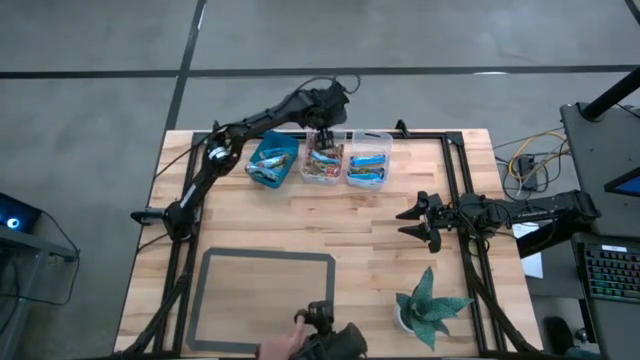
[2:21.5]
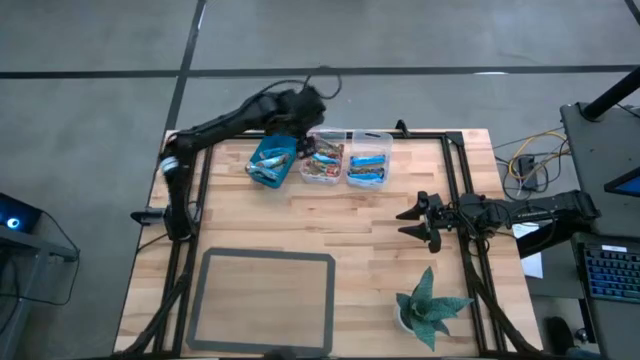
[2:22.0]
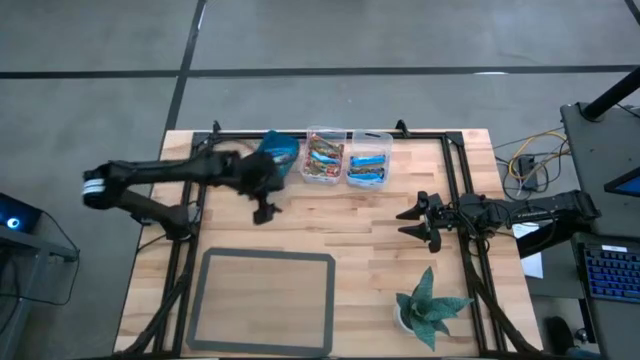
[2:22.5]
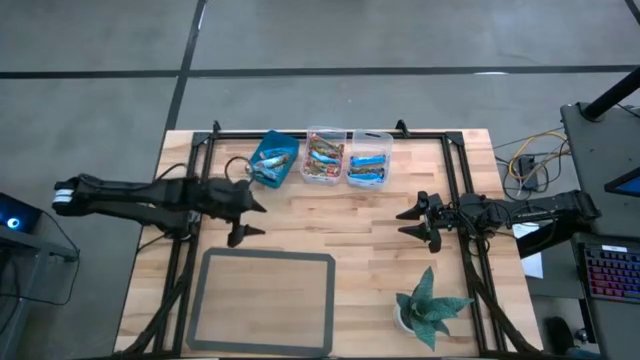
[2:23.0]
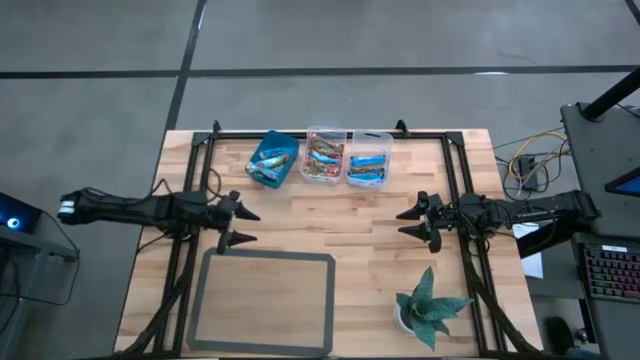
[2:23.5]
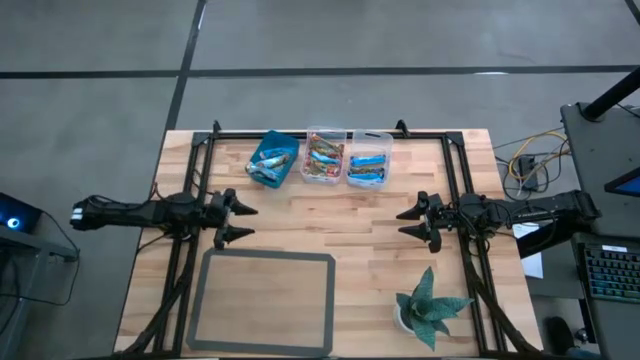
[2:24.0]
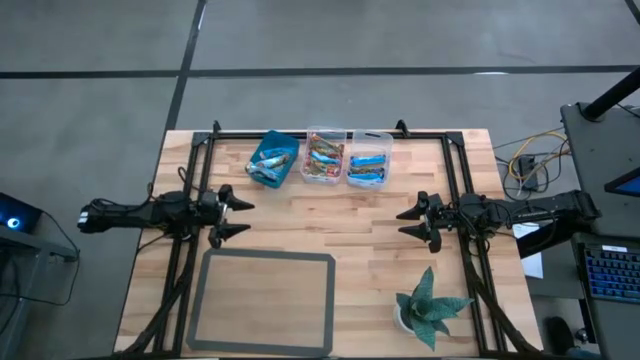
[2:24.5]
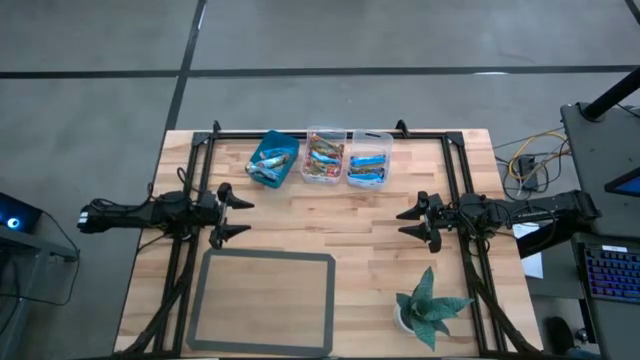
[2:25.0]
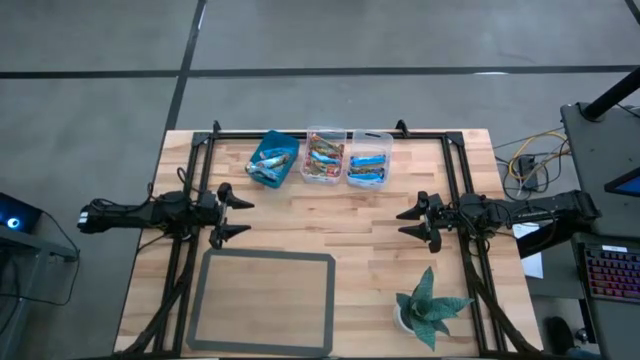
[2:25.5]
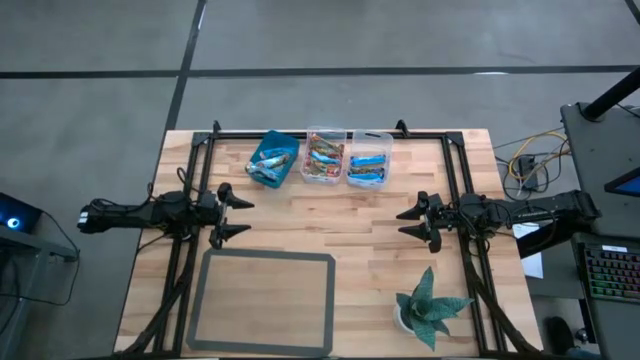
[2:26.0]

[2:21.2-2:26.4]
Task: Pick and place Granola Bars by type
Return to Home Position

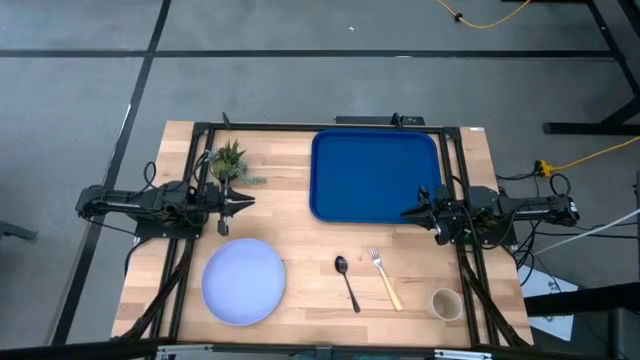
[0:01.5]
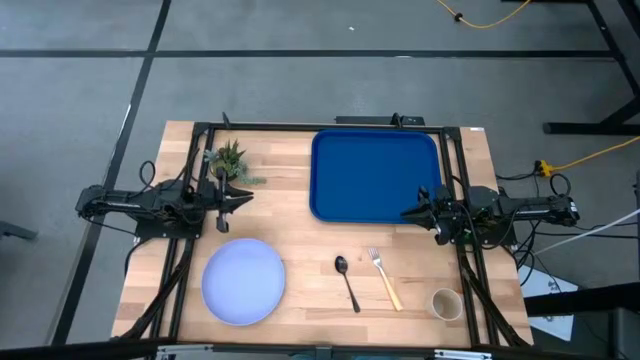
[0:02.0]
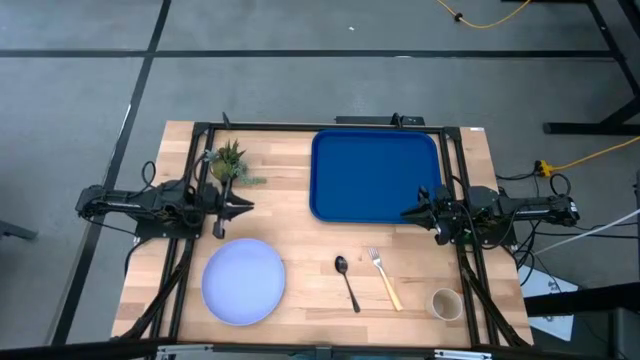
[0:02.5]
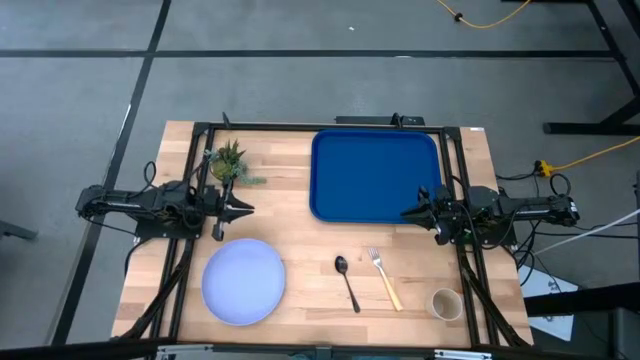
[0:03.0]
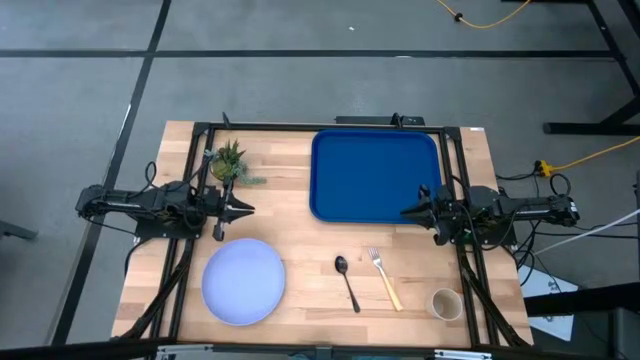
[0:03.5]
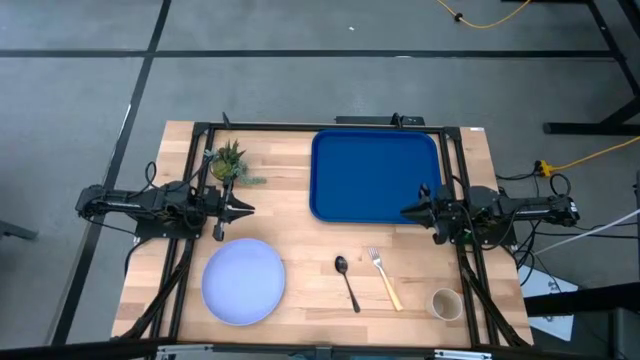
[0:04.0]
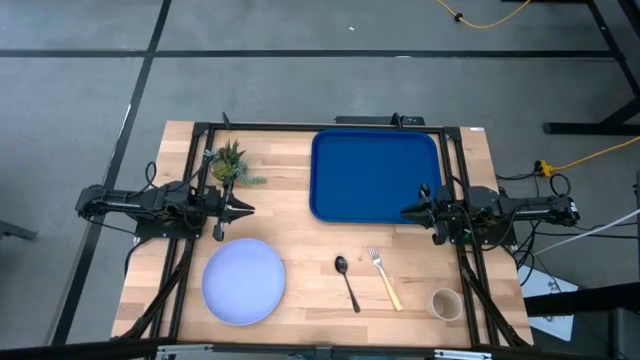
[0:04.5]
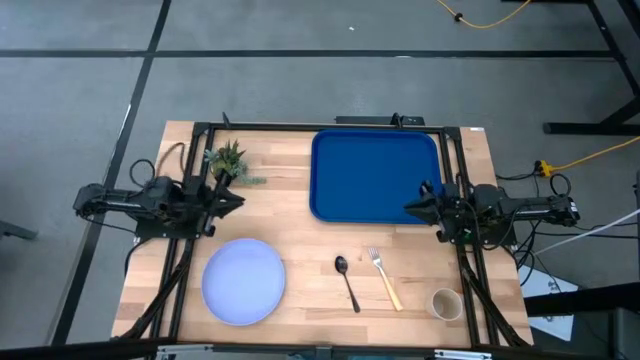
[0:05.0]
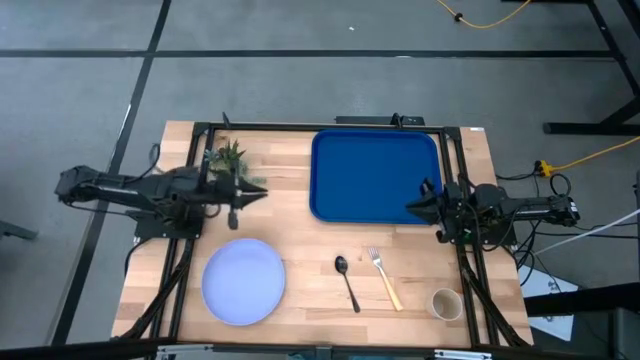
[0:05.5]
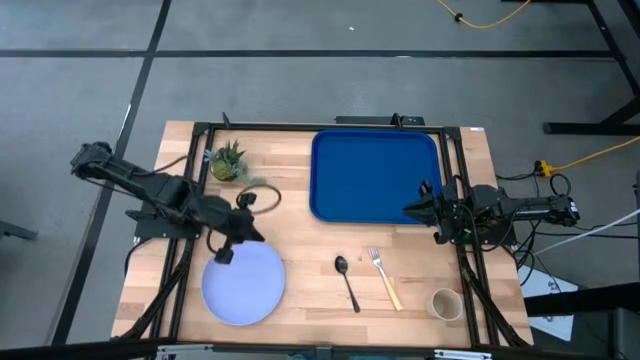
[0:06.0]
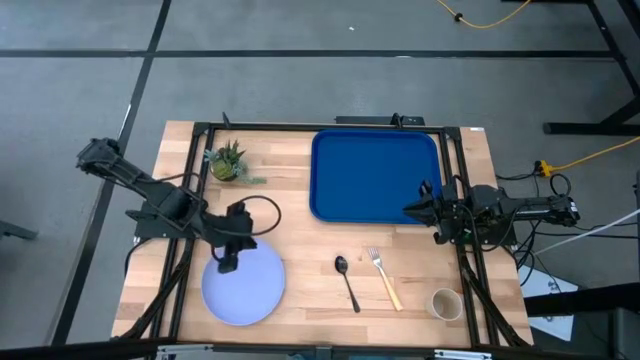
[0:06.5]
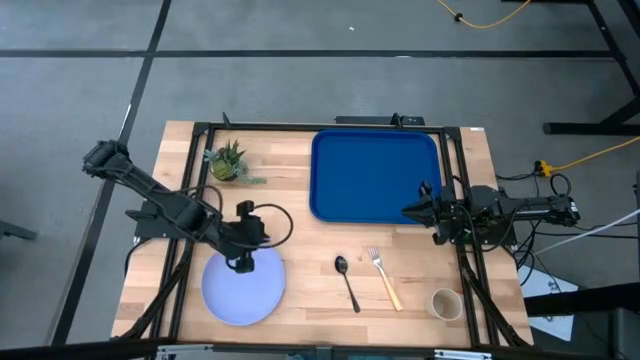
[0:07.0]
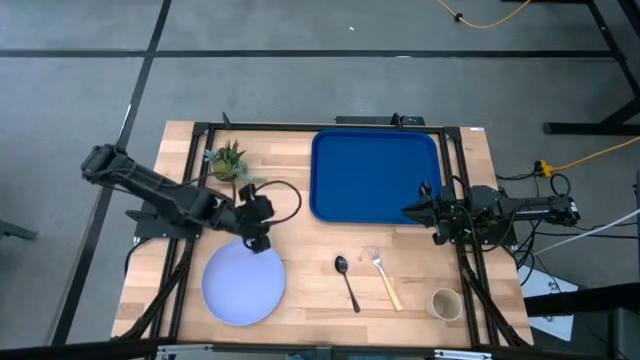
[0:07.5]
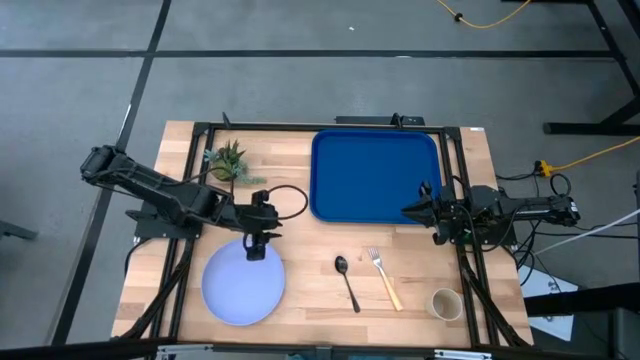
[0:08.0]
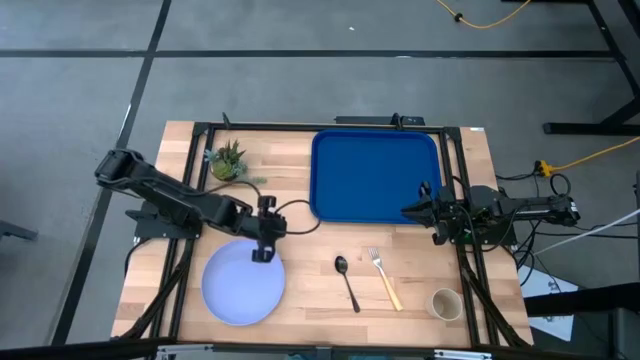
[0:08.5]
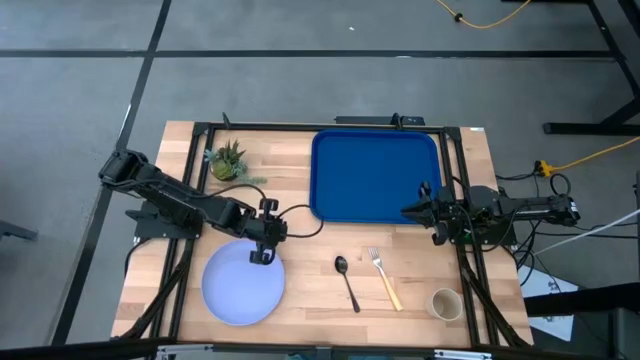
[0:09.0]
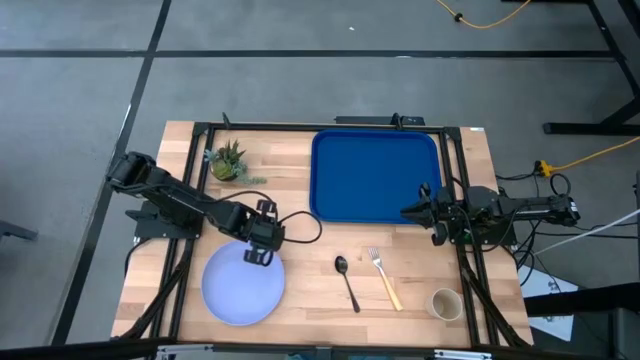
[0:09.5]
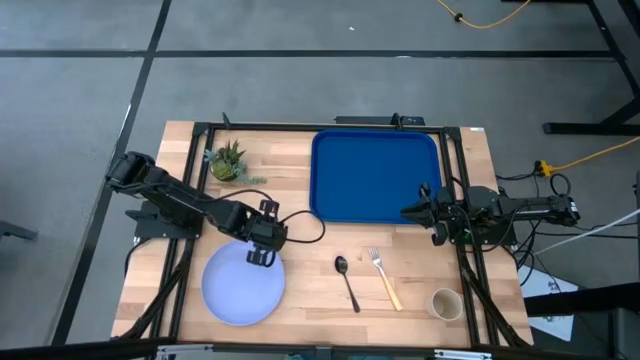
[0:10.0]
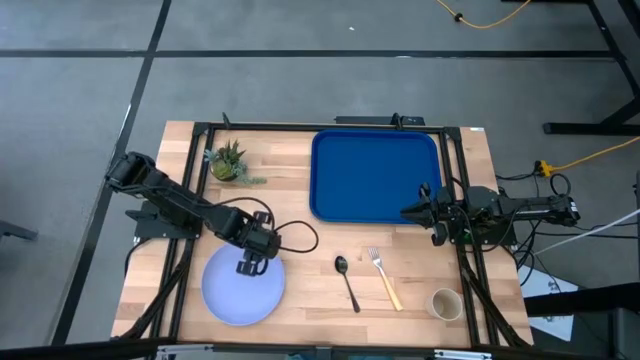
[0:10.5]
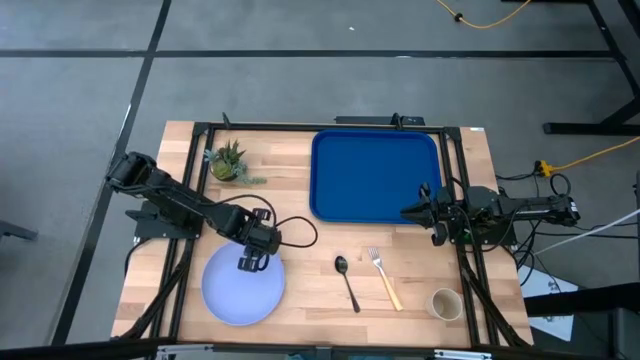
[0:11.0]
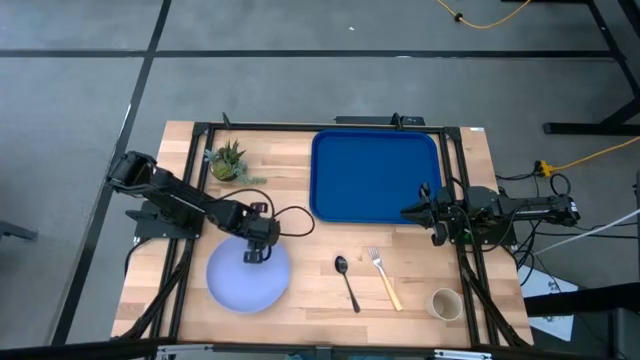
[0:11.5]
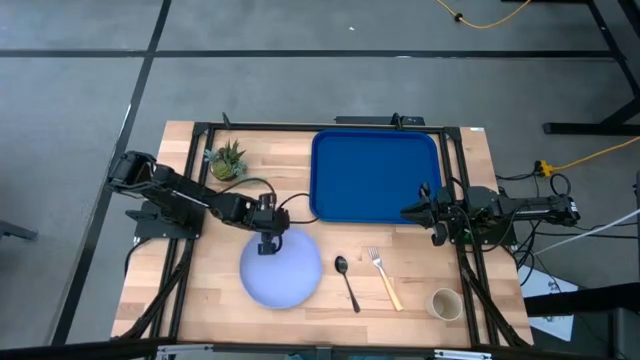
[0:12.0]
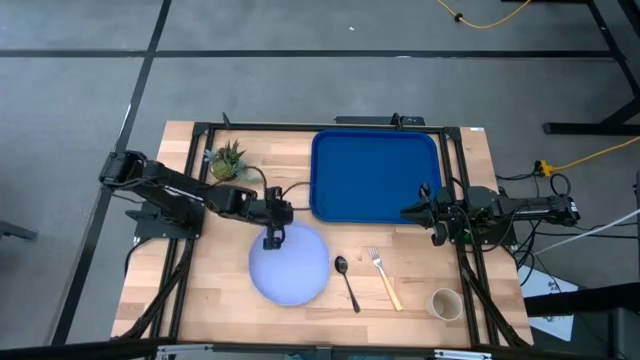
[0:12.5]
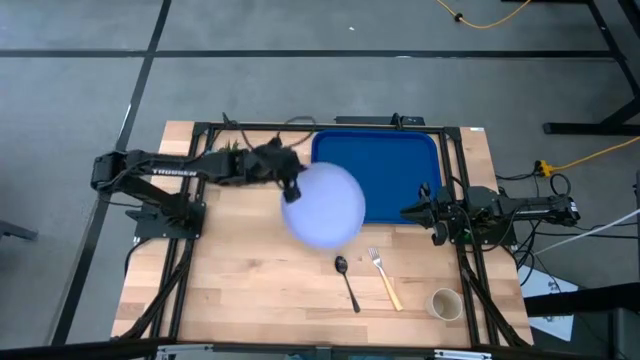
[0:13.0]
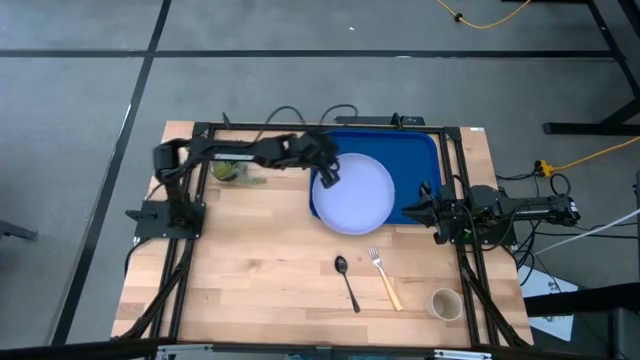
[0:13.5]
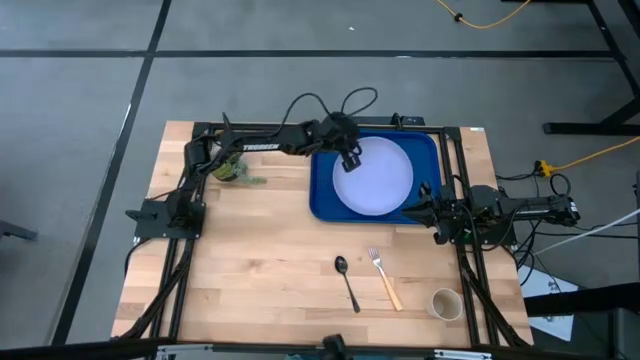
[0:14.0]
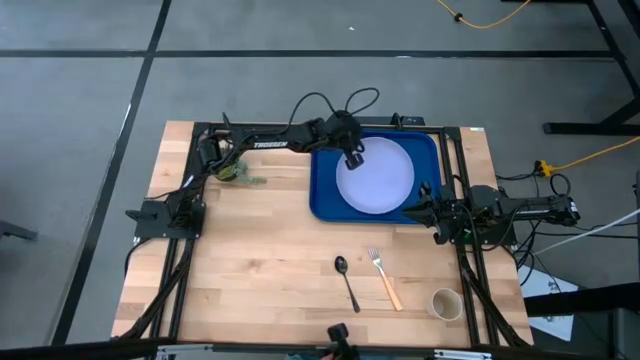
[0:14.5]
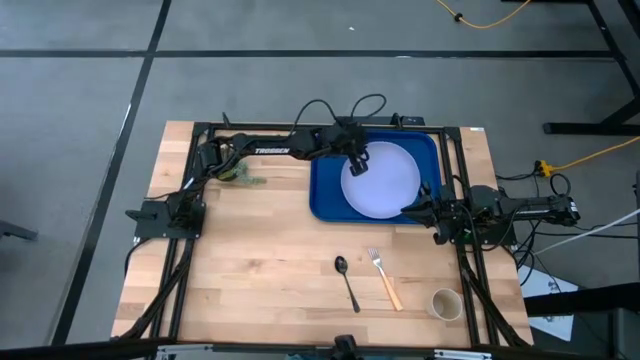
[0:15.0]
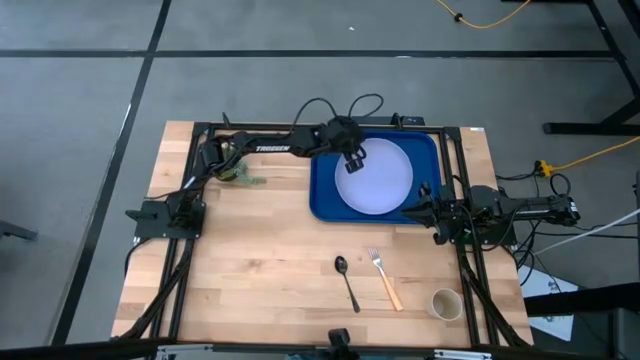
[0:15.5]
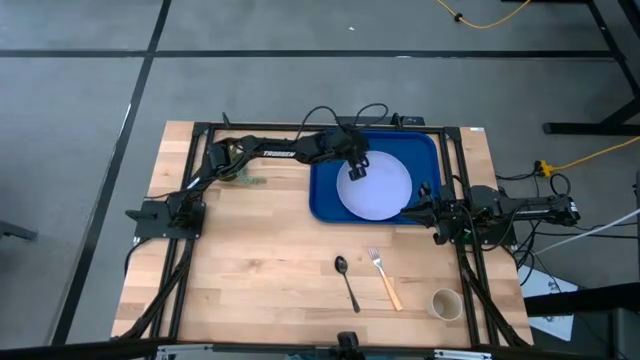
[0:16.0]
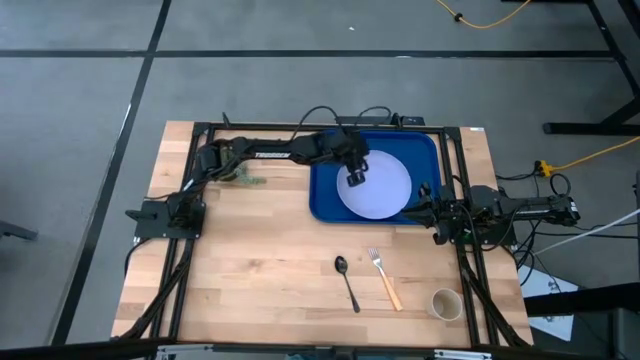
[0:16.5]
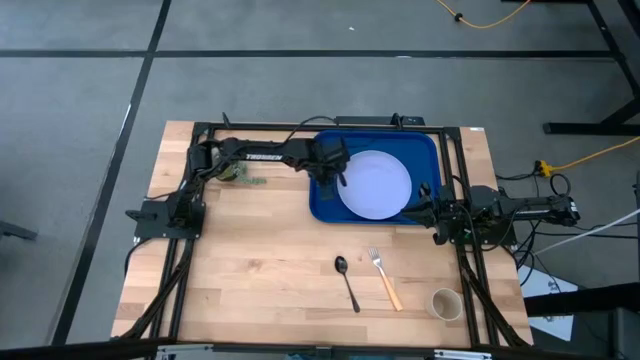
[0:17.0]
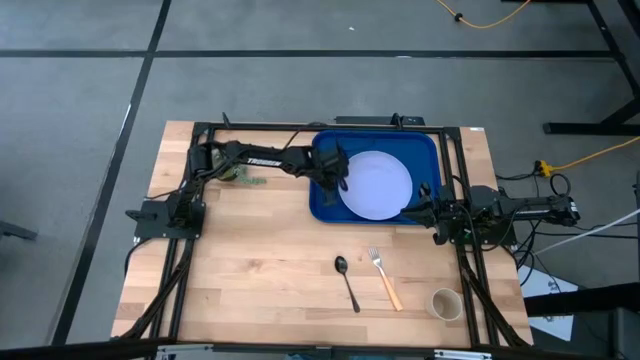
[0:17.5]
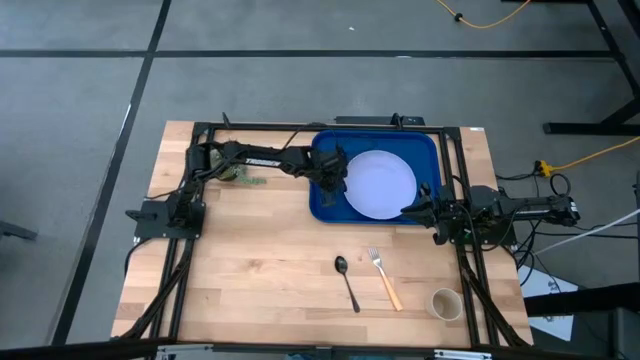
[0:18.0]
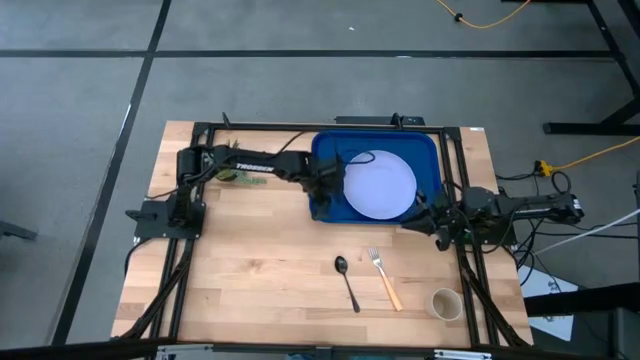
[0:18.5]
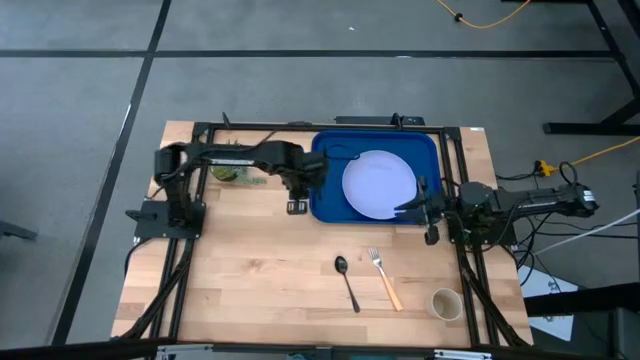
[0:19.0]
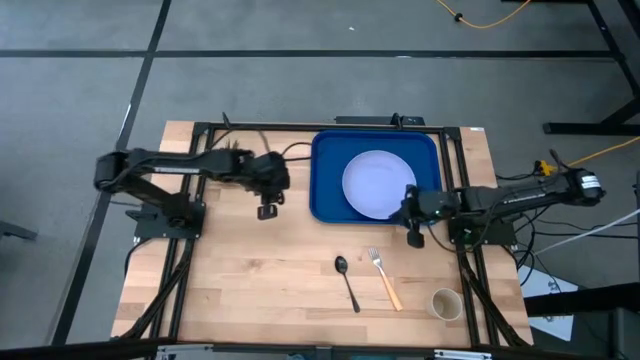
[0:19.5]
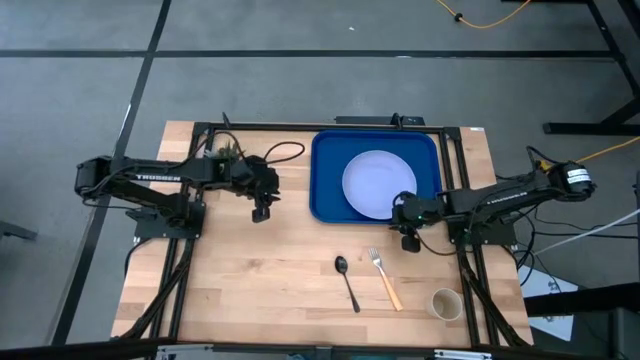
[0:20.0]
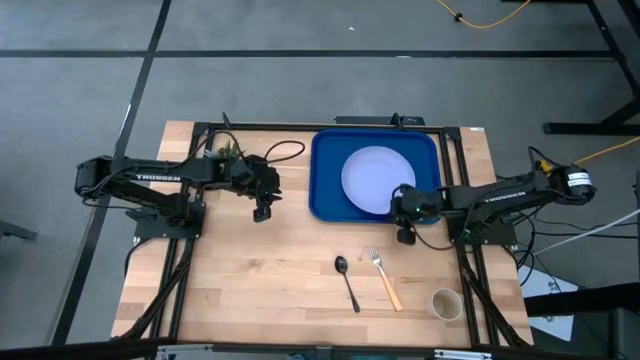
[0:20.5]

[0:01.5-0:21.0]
Task: Pick and place plate/cup/fork/spoon on tray
Put the purple plate on the blue serving tray
